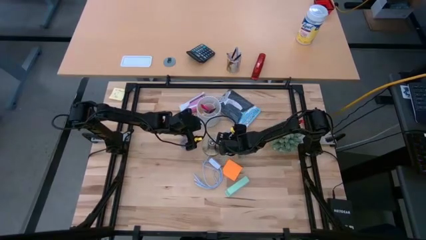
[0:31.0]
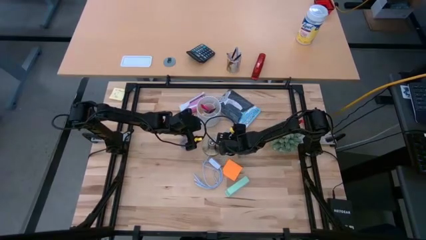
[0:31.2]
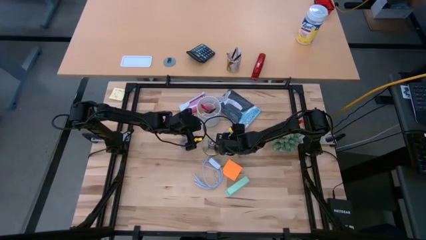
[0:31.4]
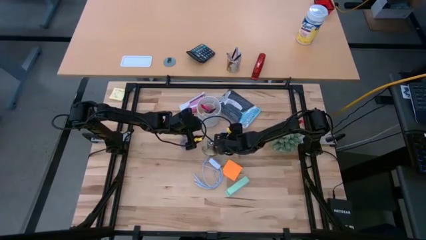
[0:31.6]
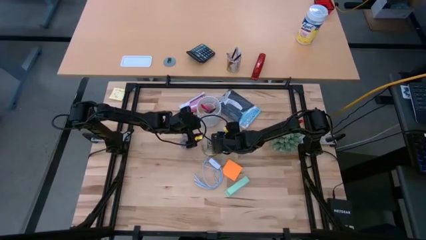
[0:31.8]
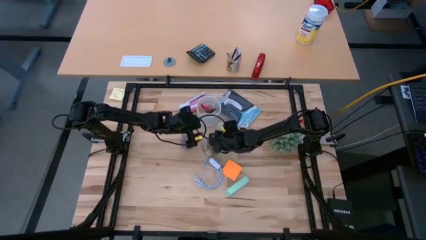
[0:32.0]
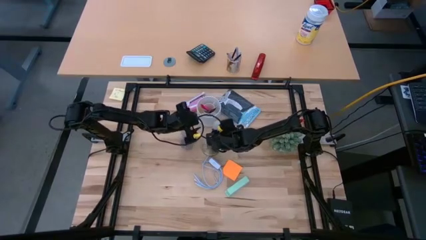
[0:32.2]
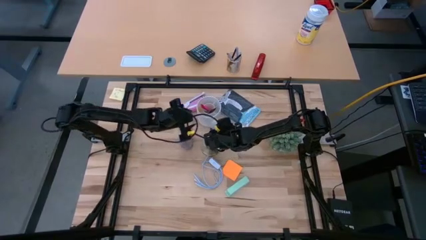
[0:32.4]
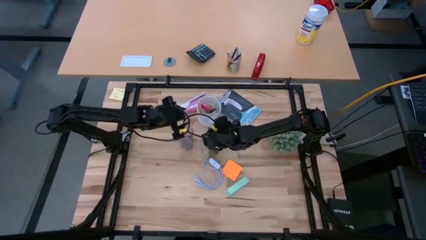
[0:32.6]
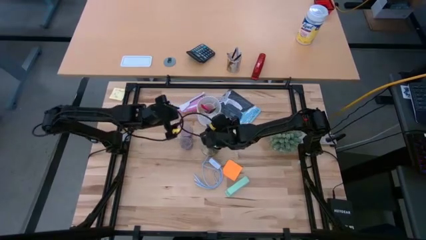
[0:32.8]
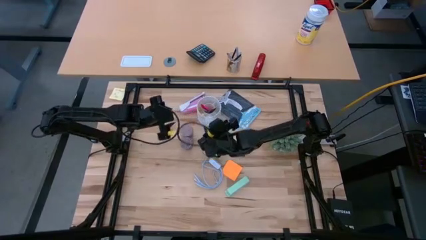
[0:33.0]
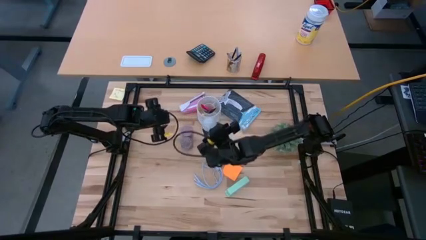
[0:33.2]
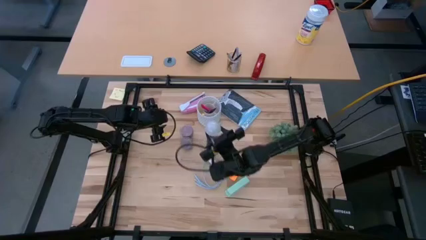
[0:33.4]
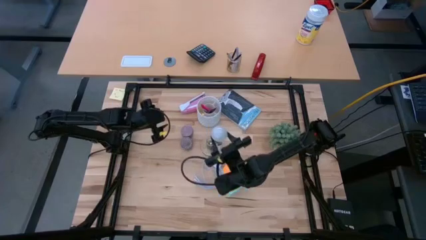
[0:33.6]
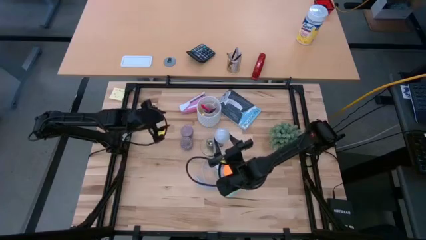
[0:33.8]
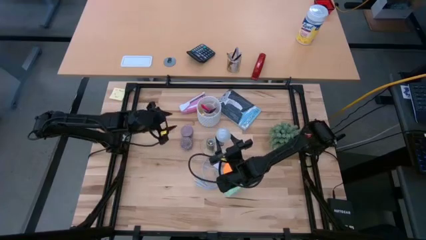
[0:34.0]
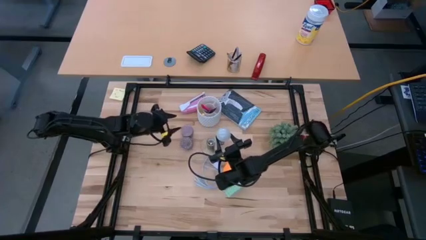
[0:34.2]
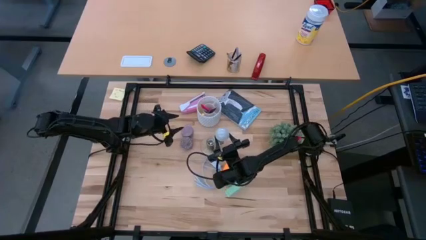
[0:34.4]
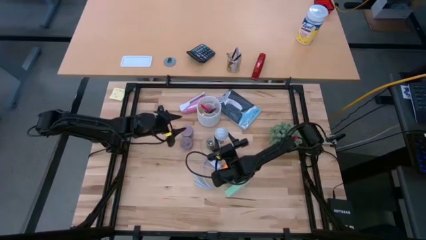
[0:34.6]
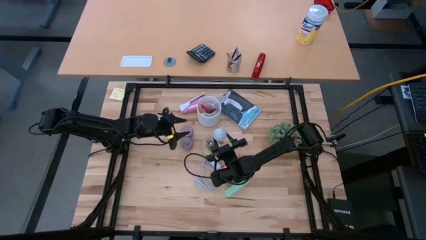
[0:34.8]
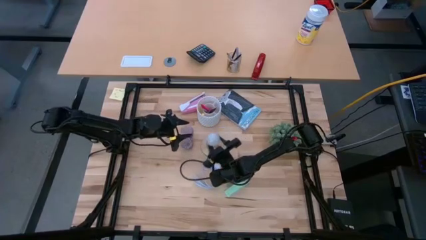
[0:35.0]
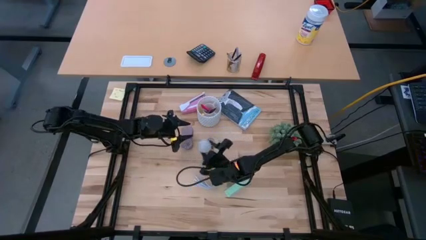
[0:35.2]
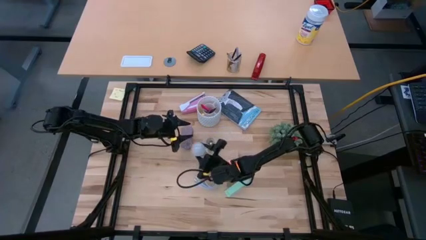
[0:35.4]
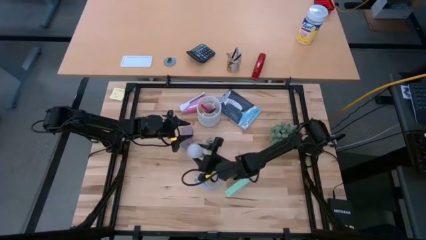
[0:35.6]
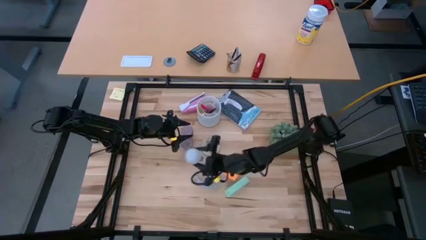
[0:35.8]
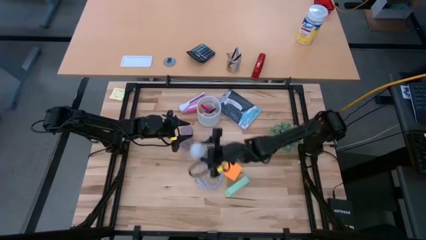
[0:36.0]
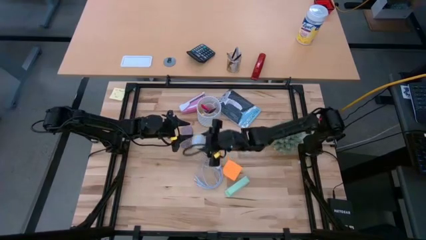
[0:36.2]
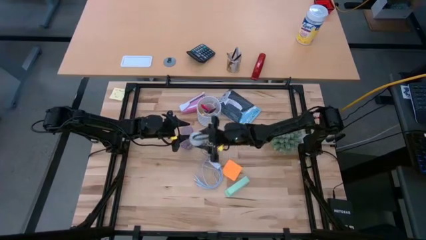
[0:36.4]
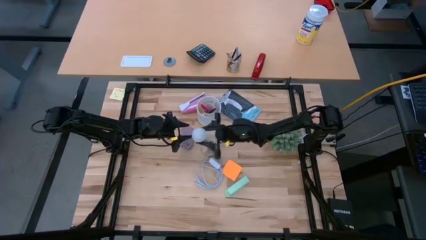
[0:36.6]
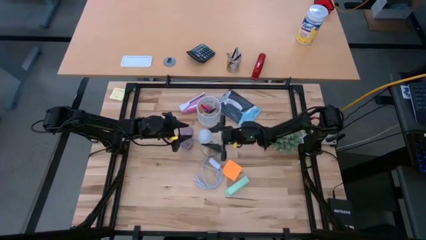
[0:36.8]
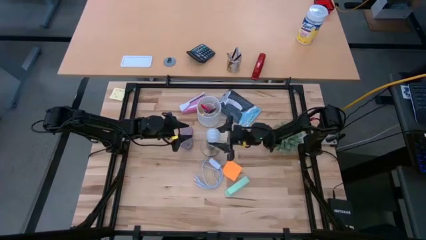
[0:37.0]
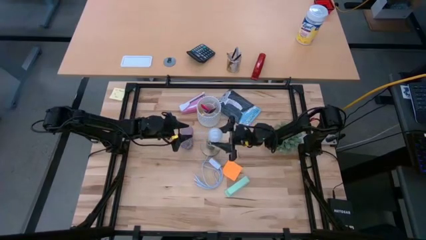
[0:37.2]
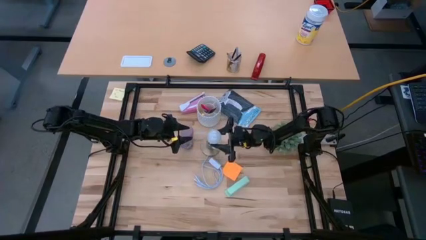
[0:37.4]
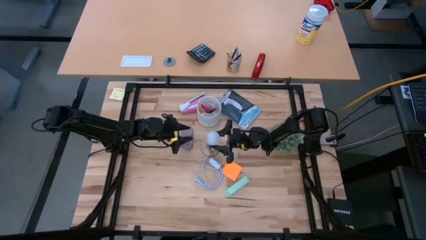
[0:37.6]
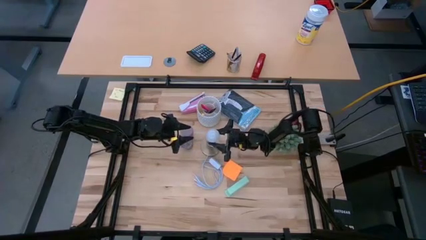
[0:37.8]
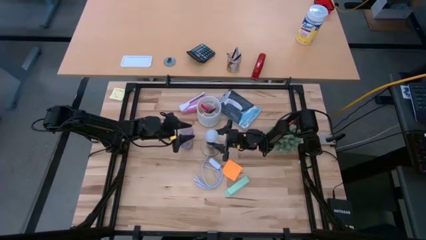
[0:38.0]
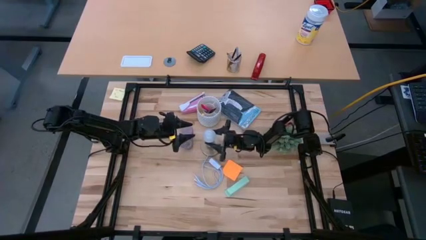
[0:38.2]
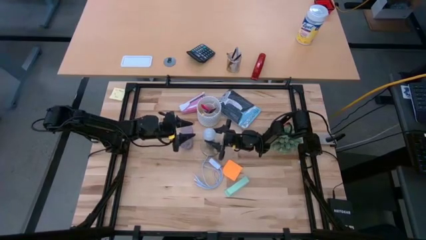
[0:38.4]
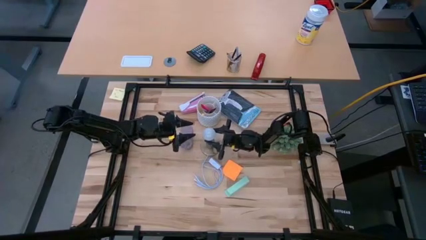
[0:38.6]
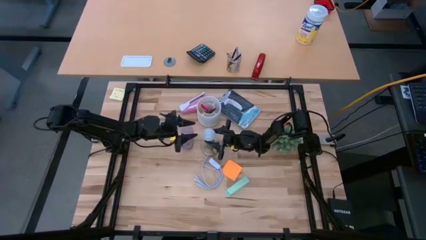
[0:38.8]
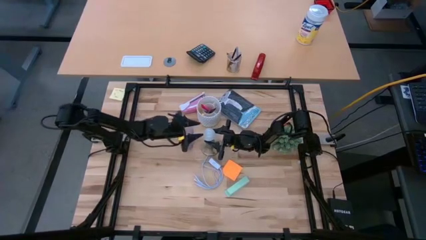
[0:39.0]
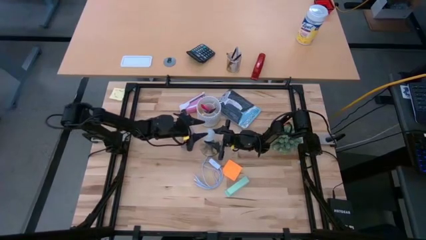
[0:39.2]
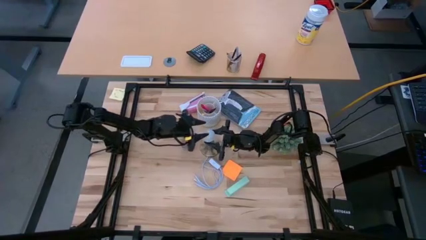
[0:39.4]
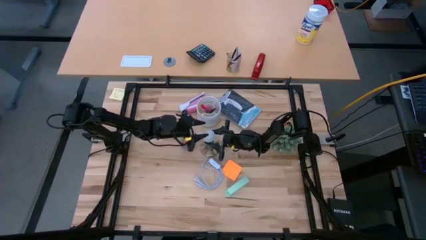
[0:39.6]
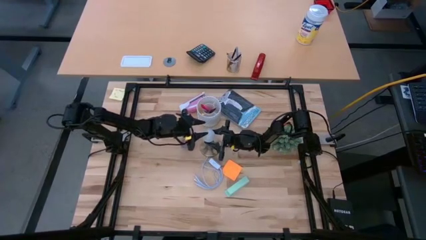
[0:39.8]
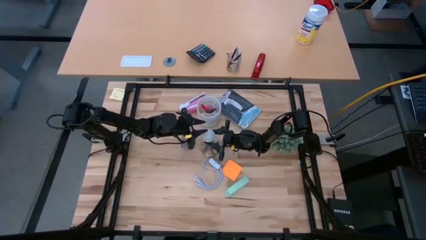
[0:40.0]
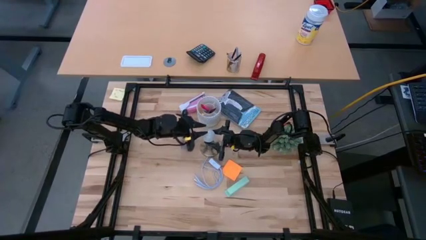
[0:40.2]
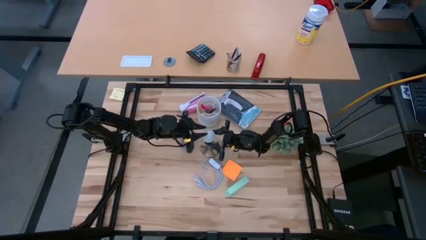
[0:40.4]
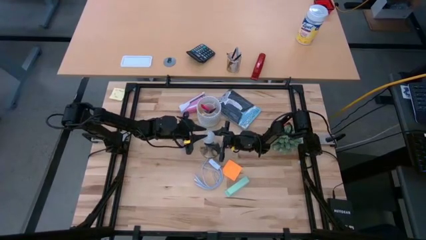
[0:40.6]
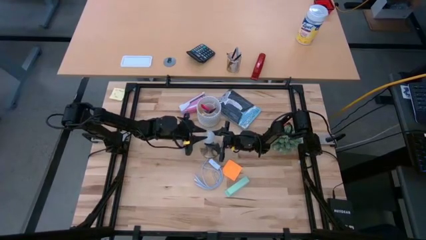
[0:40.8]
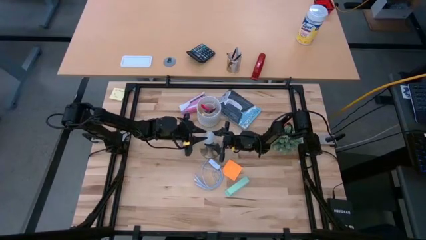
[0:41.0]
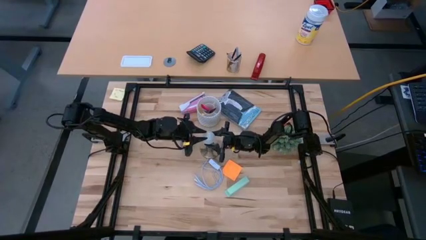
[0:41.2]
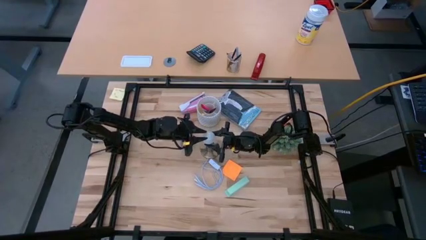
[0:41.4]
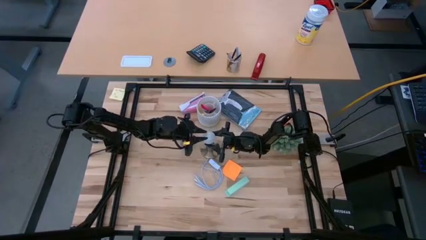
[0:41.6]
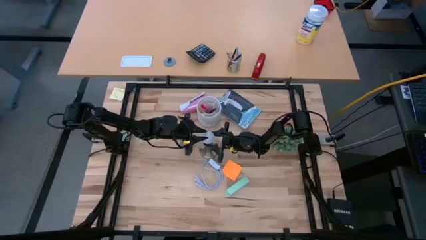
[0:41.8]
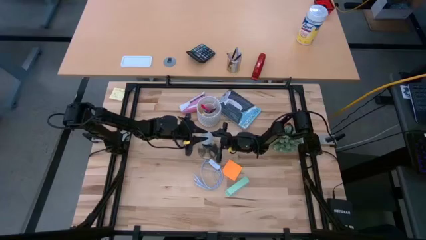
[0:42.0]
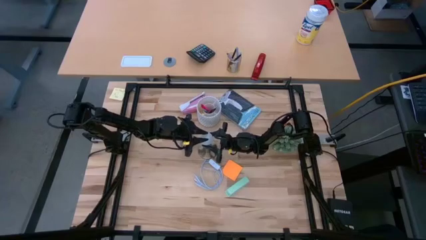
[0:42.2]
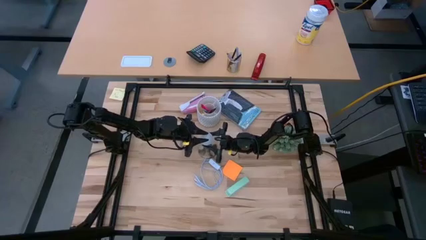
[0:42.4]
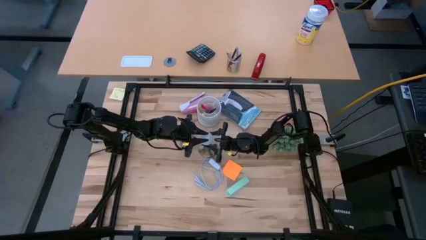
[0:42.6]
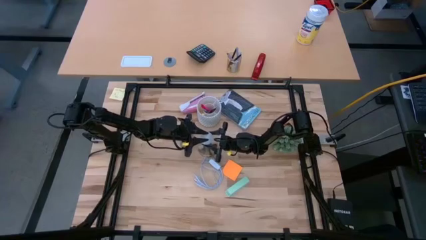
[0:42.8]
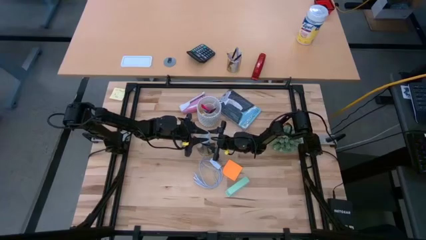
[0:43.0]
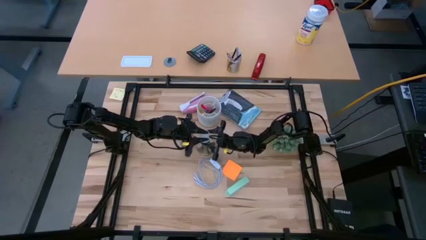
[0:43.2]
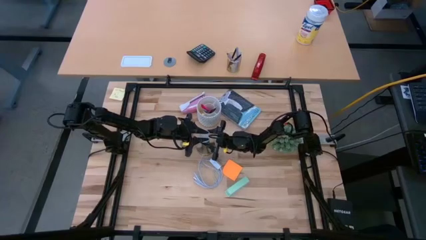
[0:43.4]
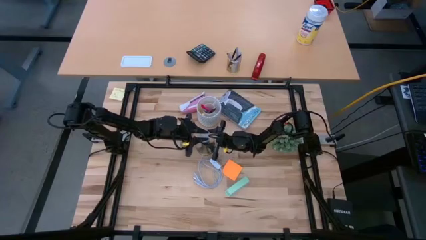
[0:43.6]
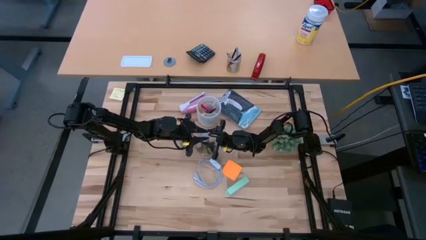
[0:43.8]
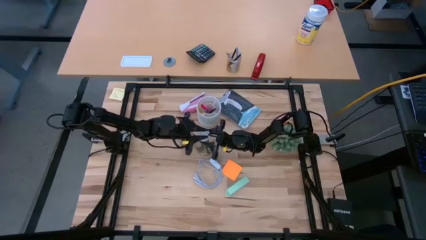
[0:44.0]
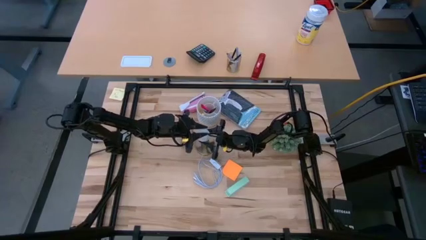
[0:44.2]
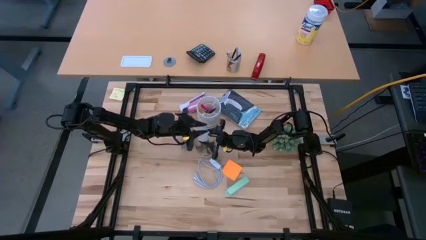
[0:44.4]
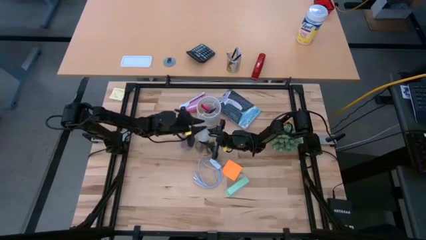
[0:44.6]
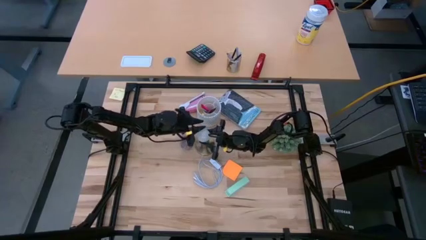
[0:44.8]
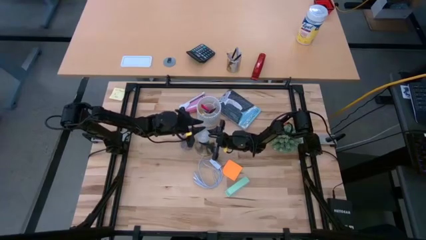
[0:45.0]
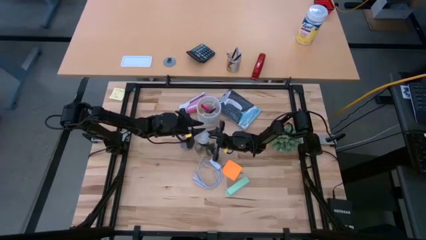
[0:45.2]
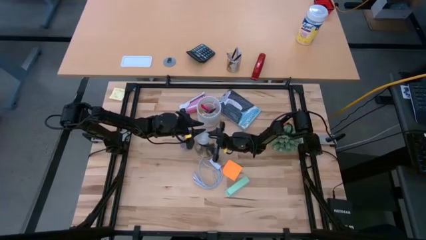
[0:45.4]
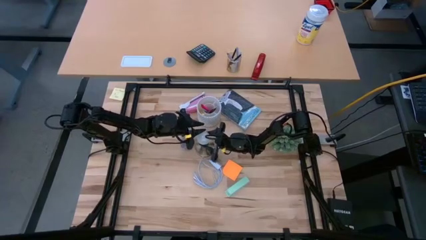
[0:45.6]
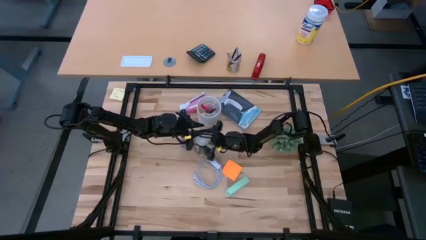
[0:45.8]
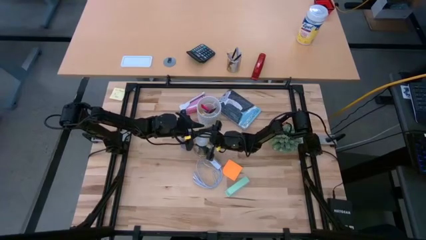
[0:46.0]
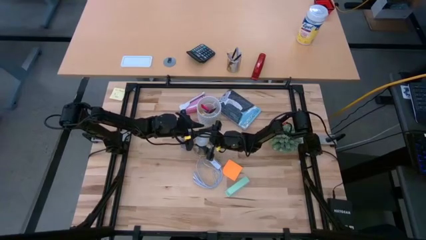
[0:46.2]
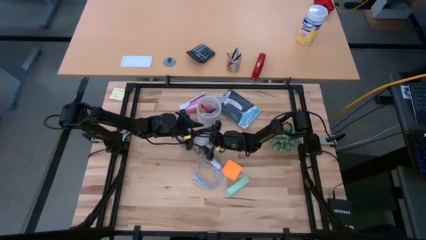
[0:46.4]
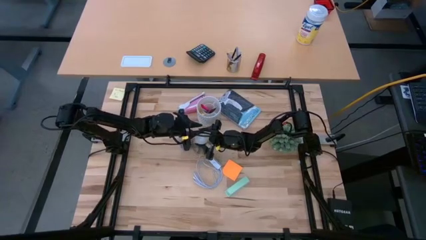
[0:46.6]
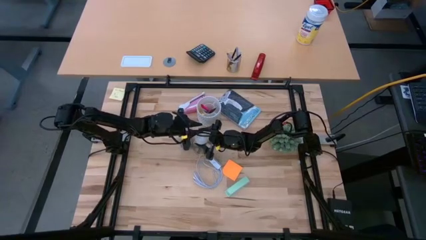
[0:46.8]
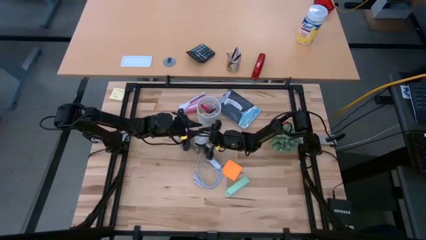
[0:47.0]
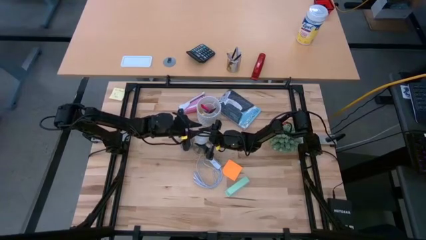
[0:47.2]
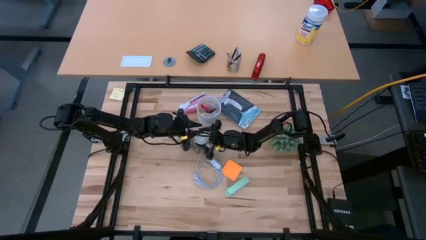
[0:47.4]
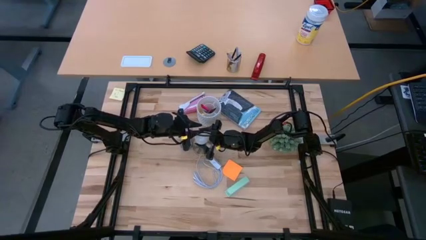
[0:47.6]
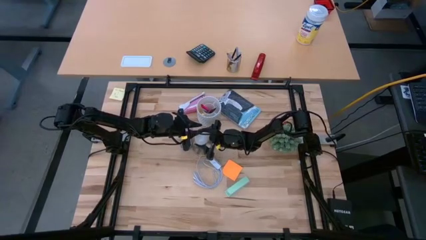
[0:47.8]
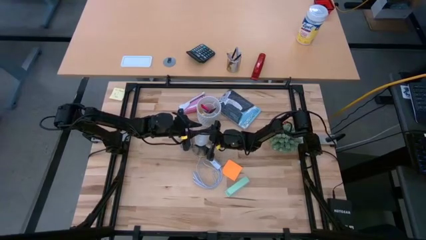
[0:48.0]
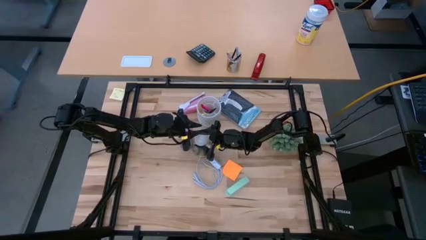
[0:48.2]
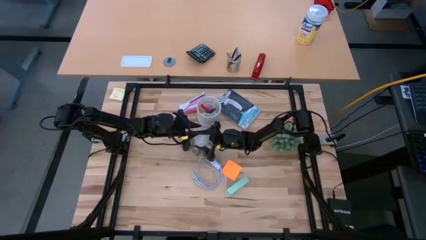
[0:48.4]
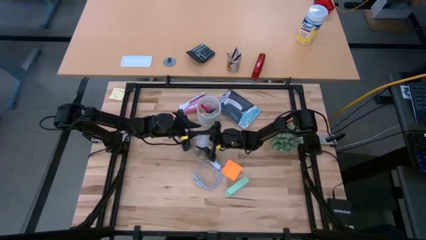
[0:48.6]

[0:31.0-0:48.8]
Task: Screw lightbulb
Insert the lightbulb into the lamp
